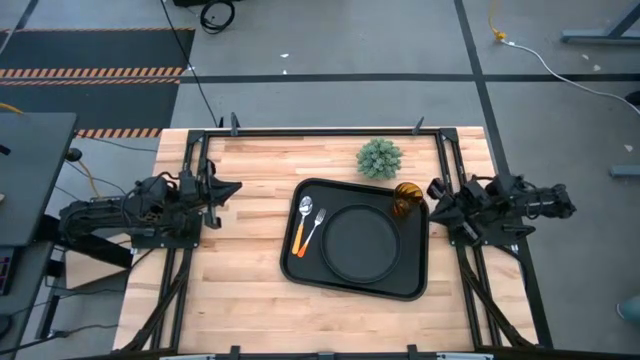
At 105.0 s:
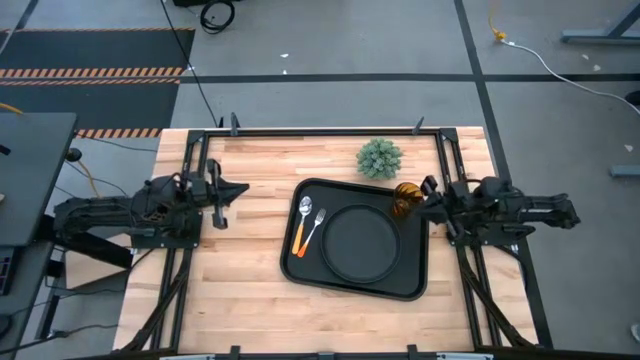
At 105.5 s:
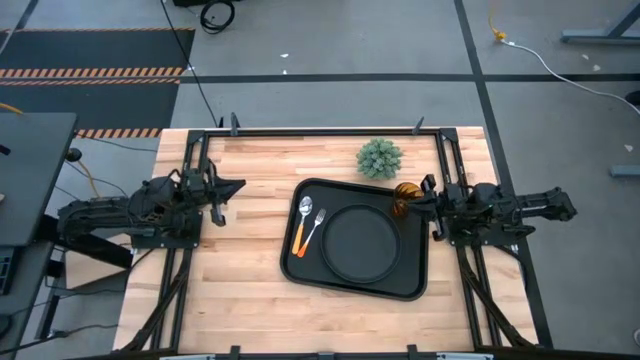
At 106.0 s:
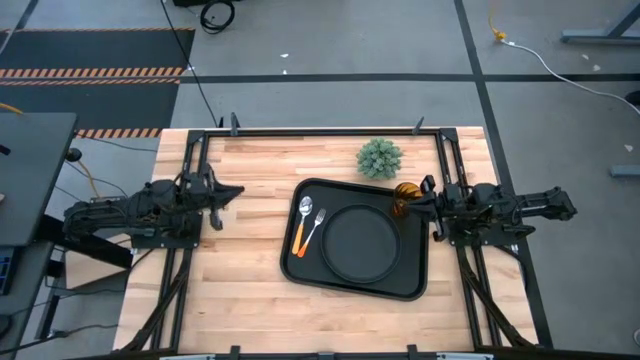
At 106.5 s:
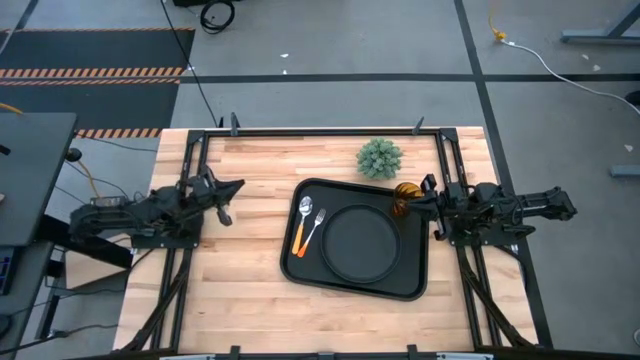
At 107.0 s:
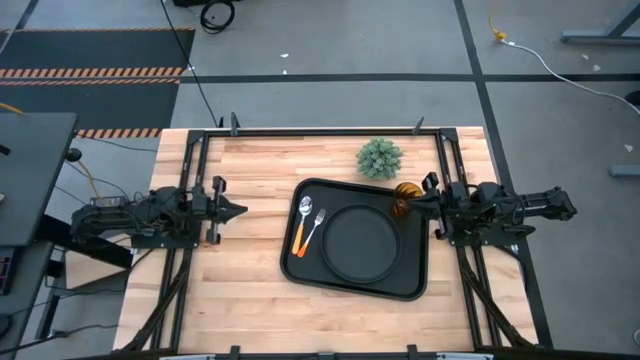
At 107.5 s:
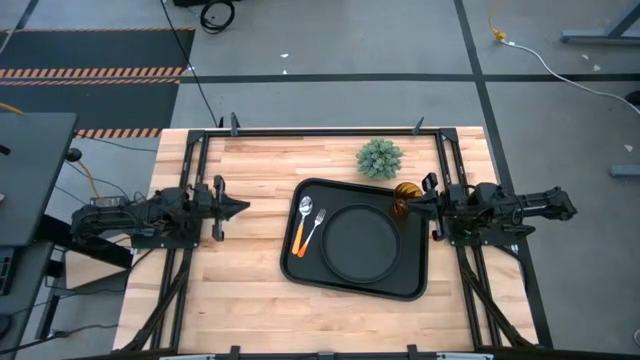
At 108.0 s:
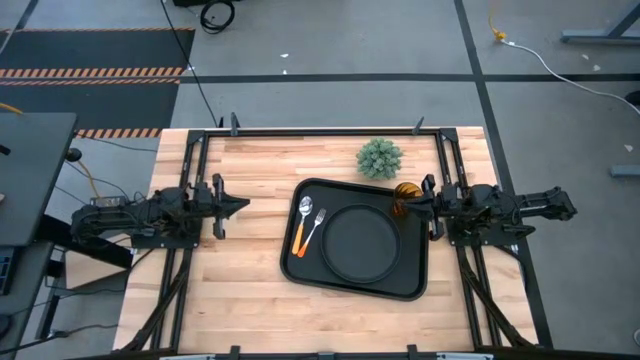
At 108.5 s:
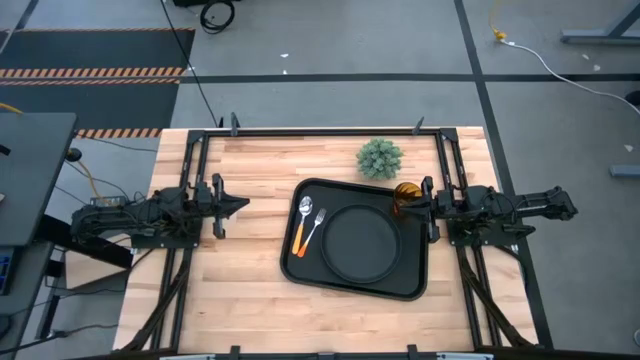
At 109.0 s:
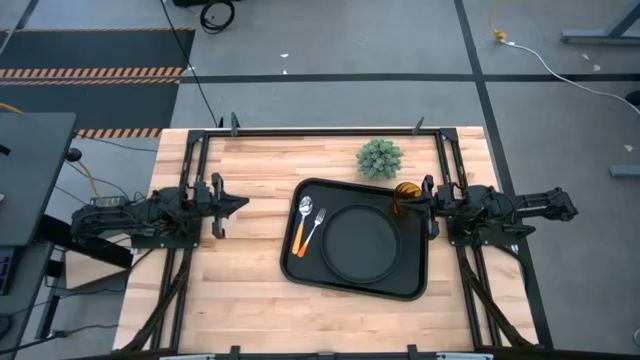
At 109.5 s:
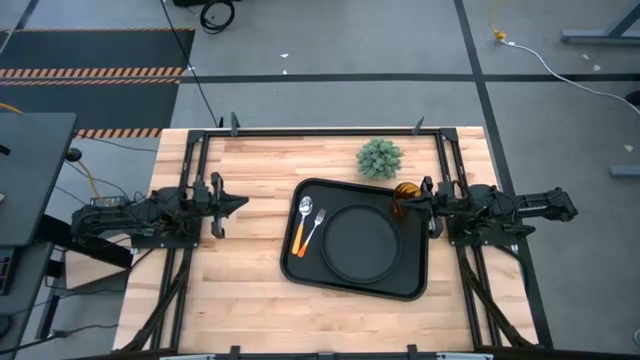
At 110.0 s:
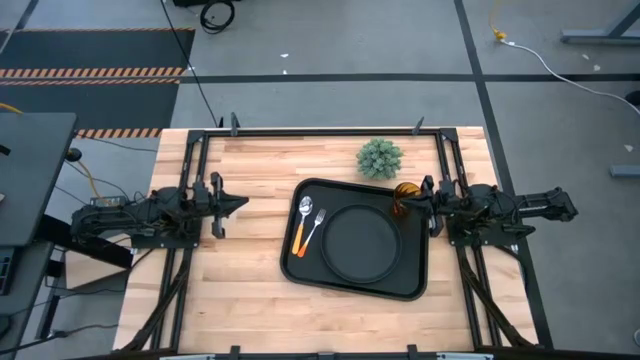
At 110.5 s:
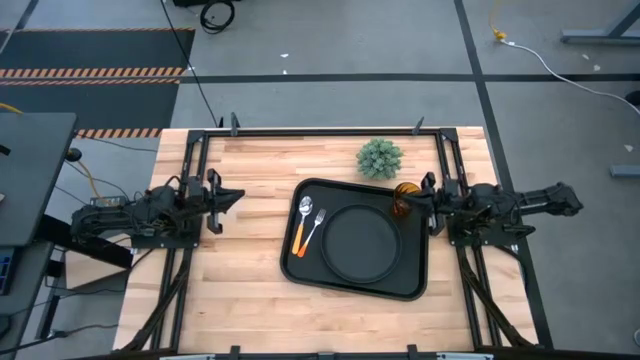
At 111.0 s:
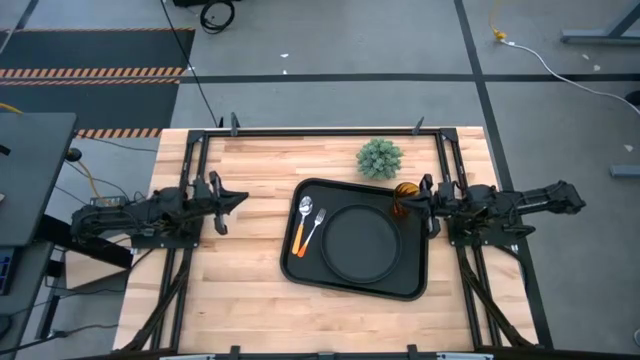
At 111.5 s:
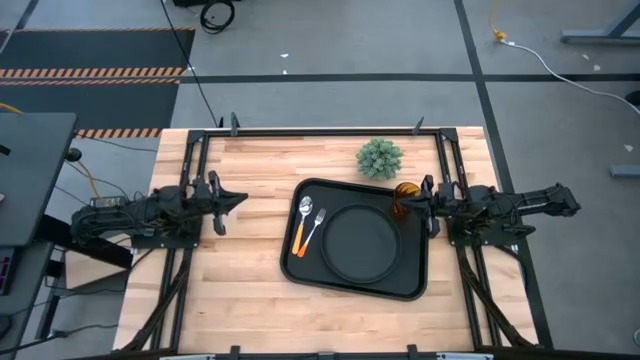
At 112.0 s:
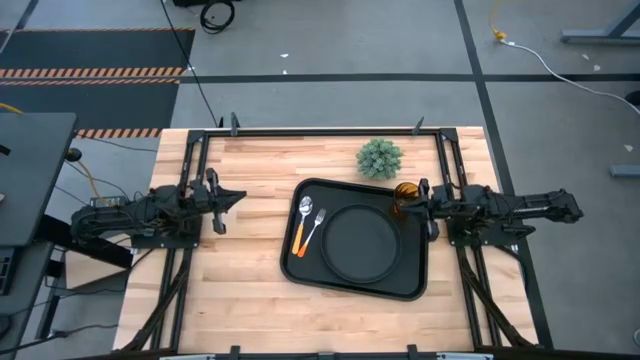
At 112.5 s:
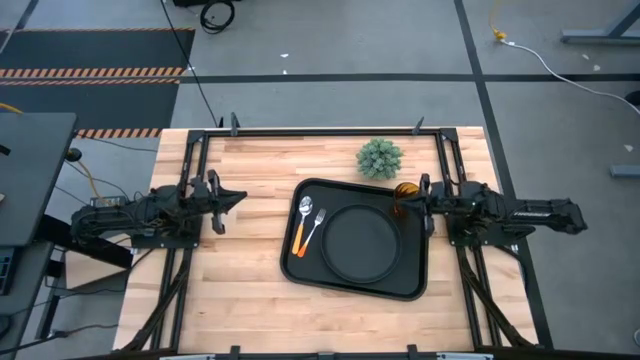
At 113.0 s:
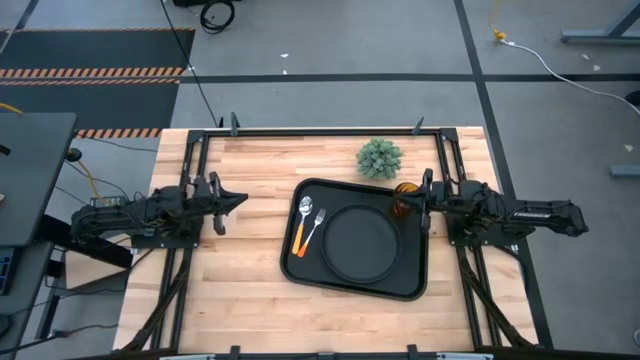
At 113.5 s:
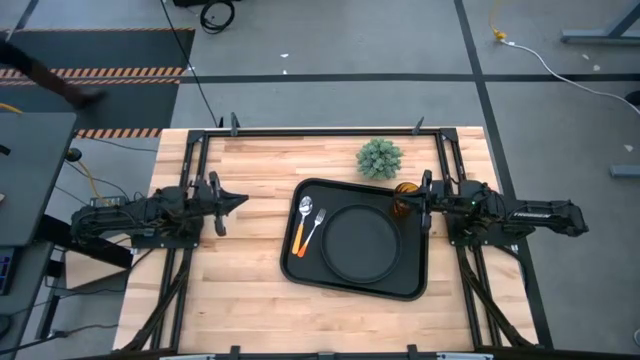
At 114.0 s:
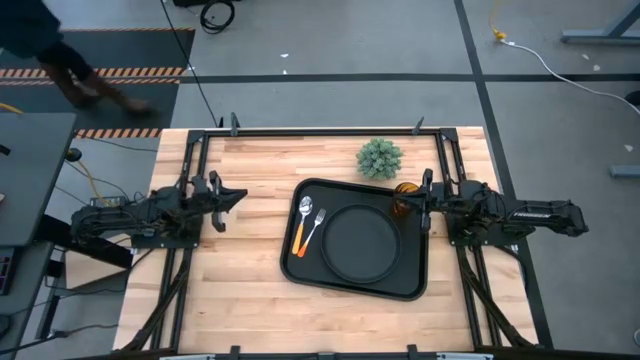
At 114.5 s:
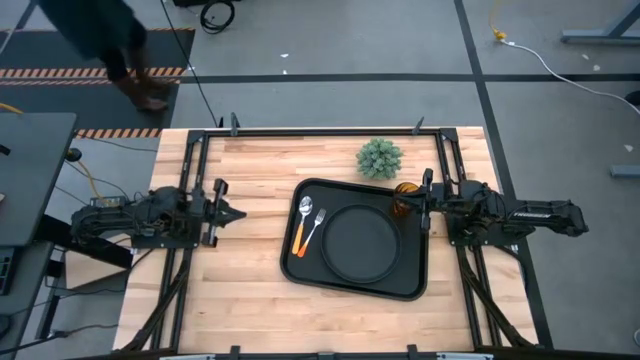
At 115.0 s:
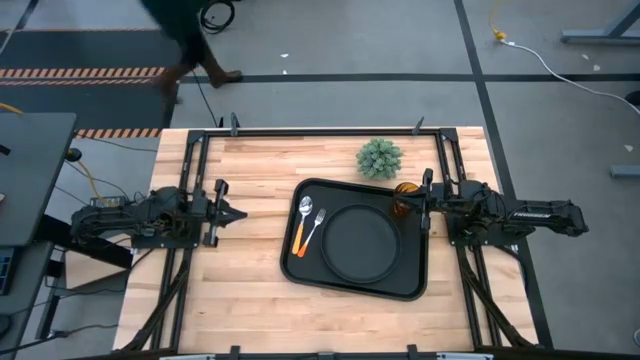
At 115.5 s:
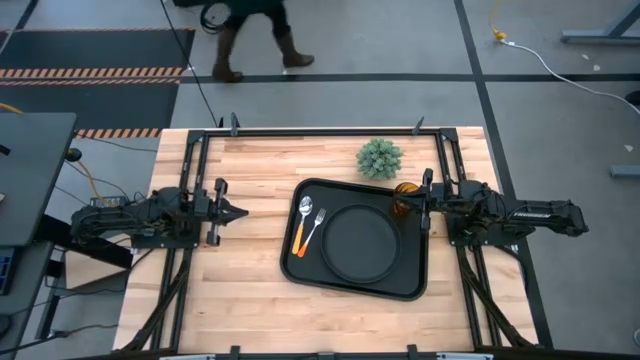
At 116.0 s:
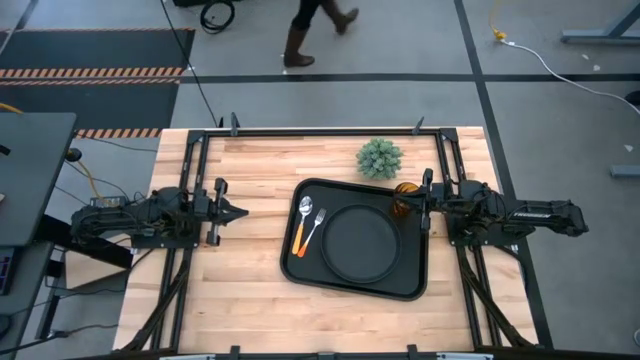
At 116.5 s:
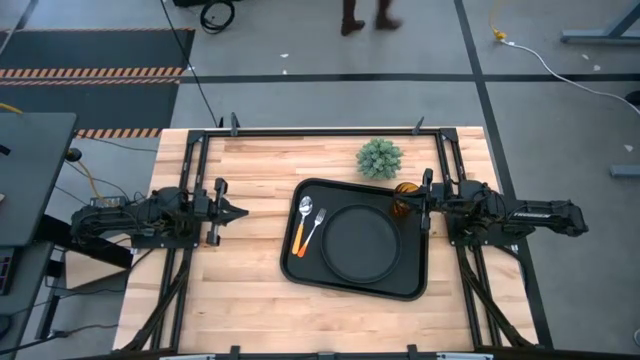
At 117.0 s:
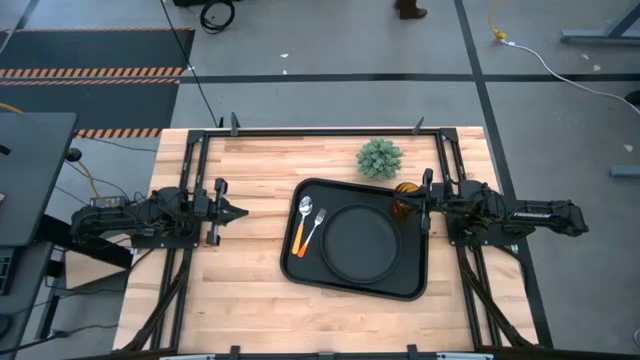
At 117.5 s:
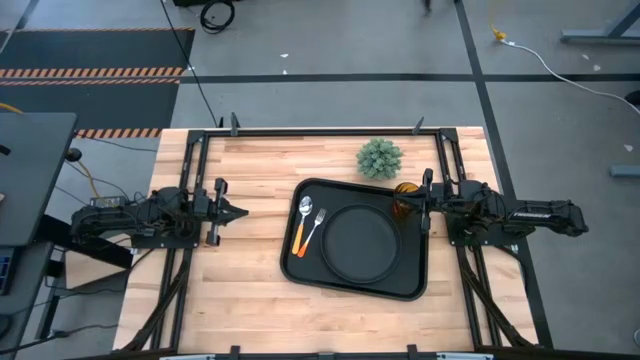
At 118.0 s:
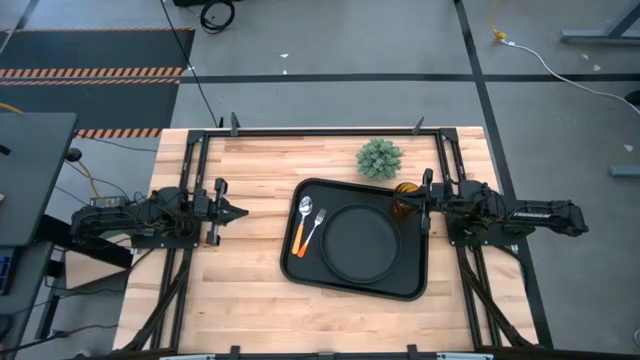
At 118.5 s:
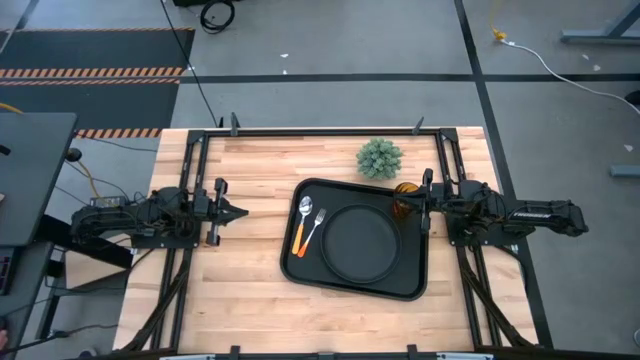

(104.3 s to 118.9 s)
Task: Pick and place plate/cup/fork/spoon on tray
Return to Home Position

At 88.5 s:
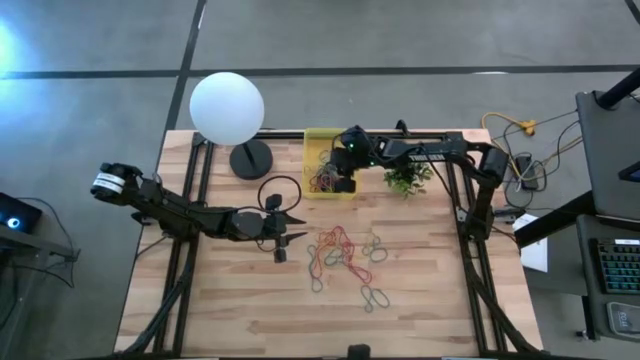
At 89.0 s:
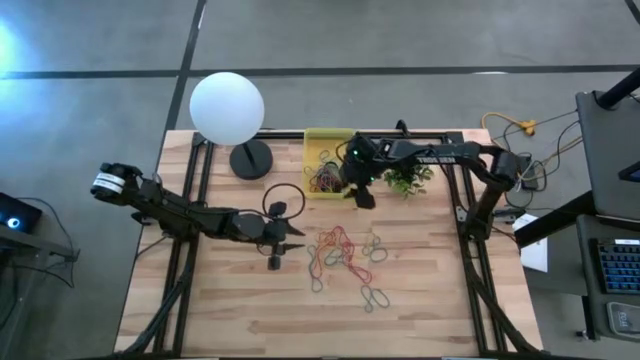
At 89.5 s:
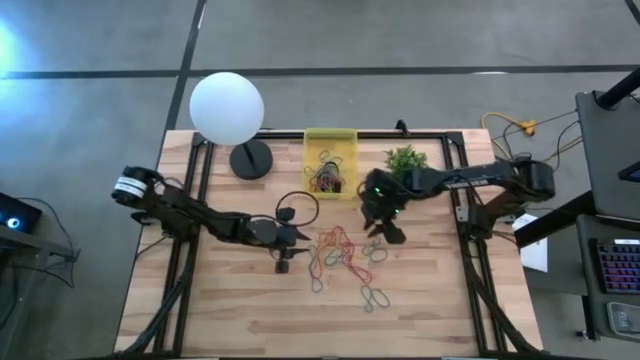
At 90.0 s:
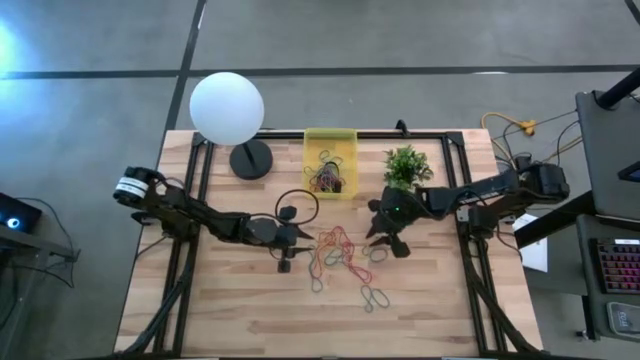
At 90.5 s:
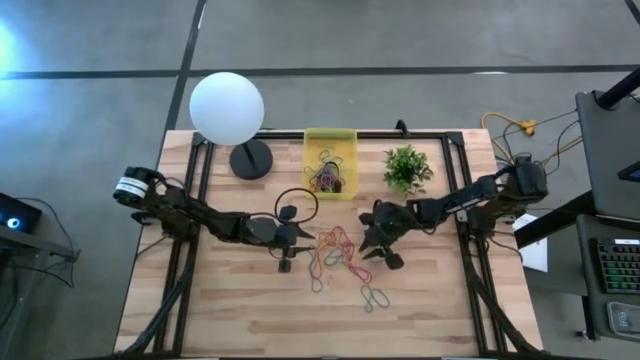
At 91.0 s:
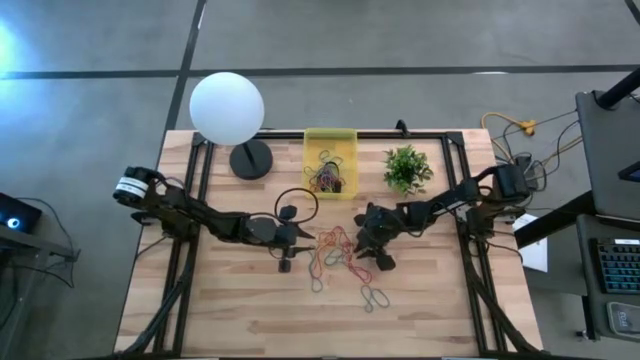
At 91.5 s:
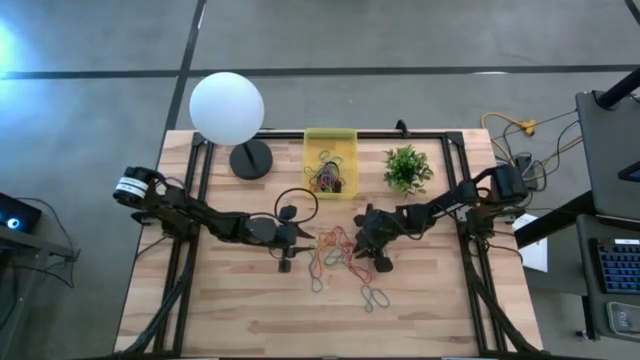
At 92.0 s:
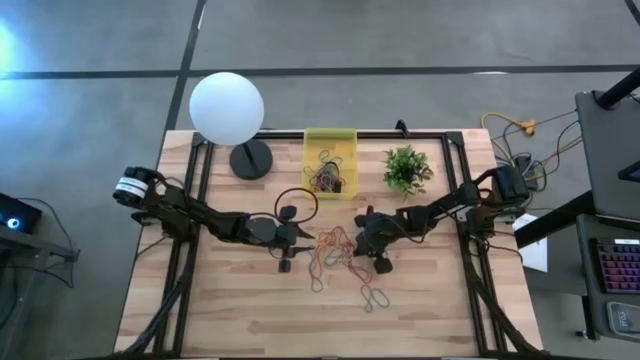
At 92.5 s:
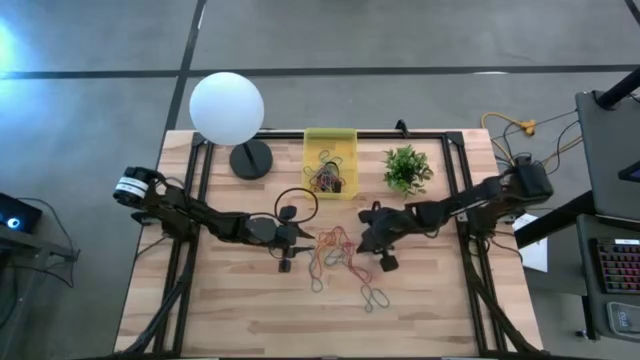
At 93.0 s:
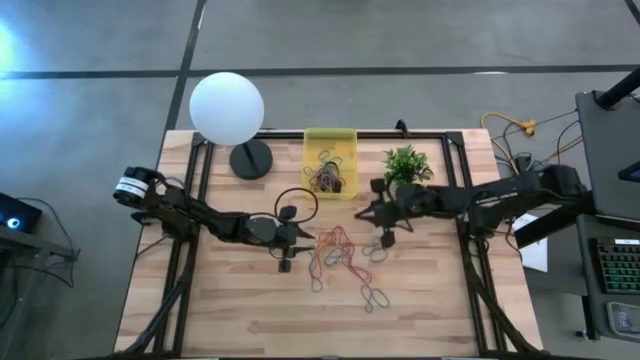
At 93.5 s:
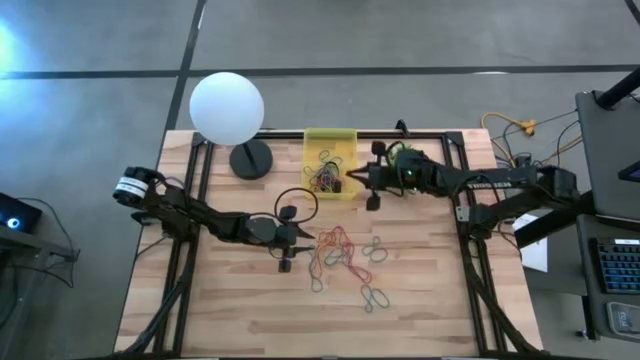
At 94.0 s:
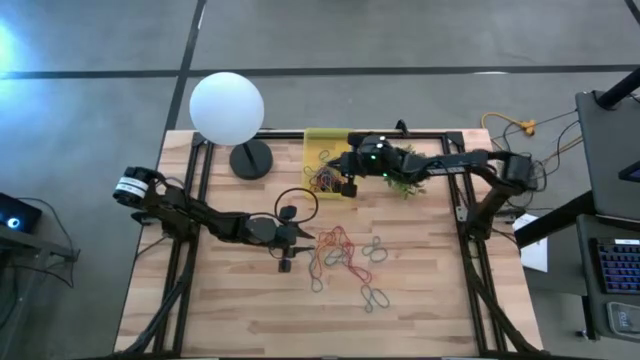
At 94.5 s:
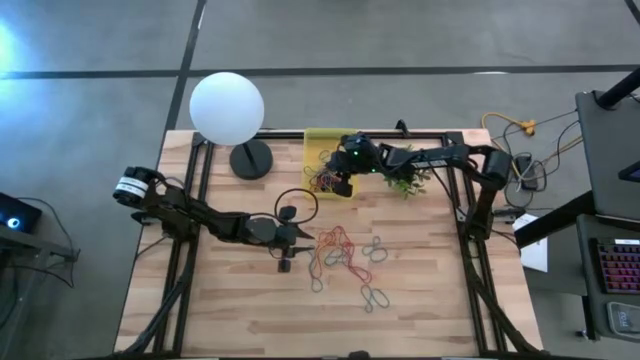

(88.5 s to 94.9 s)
Task: Pick and place rubber bands into bin
Put the yellow rubber band into the yellow bin
